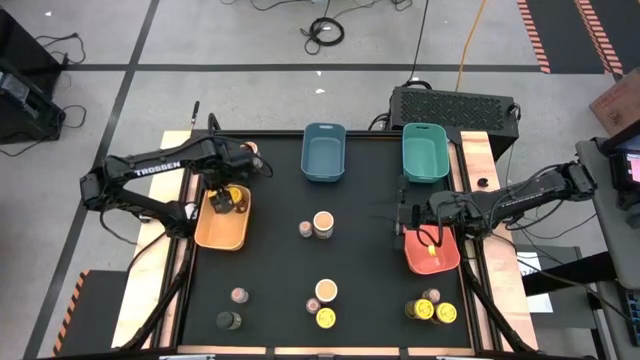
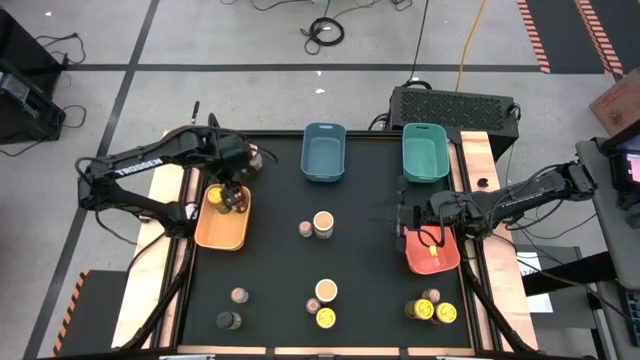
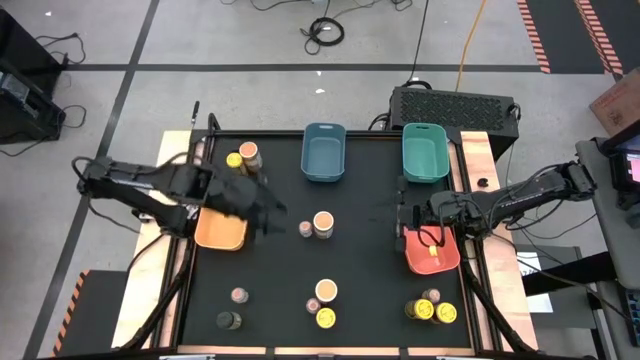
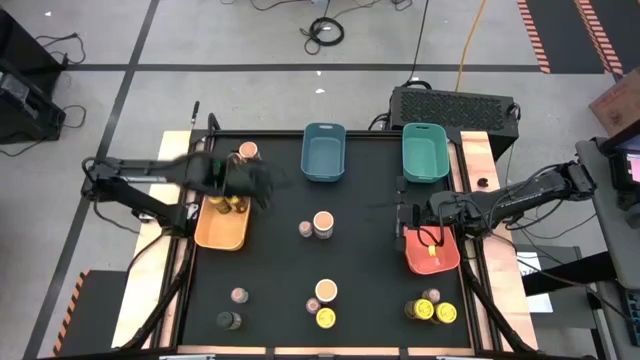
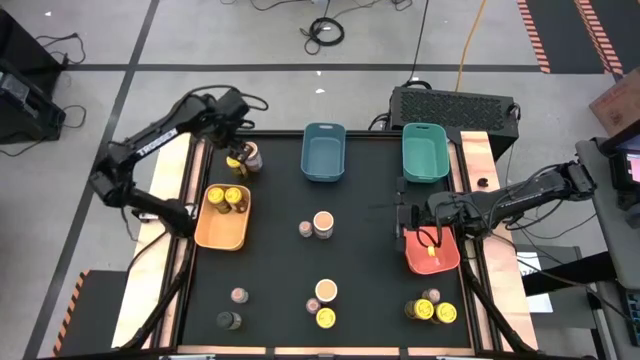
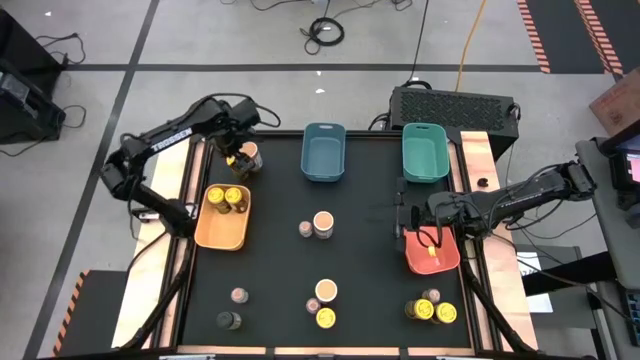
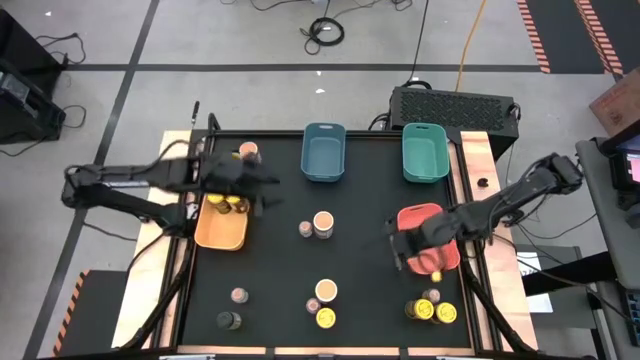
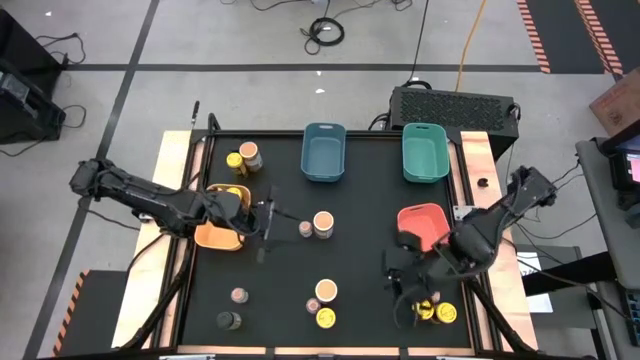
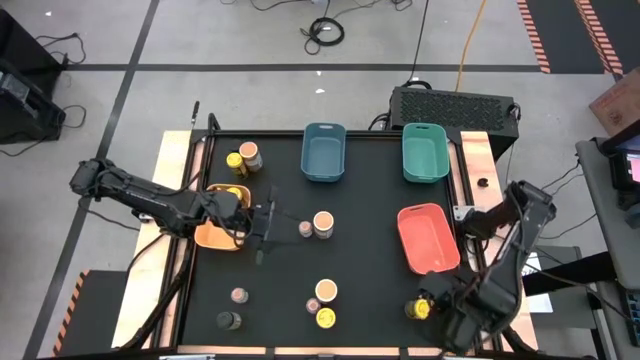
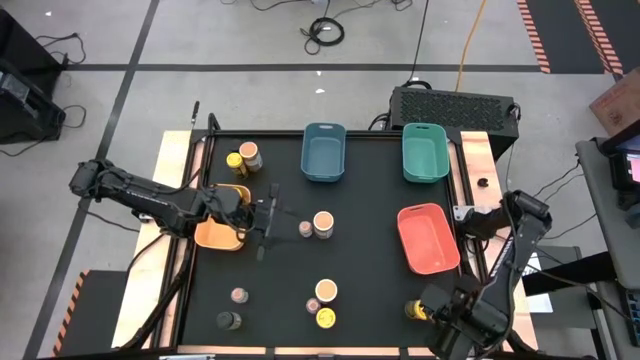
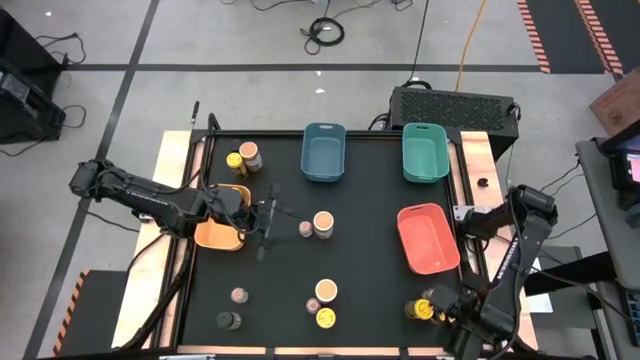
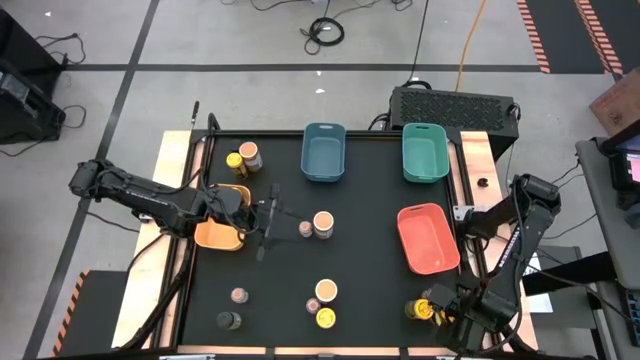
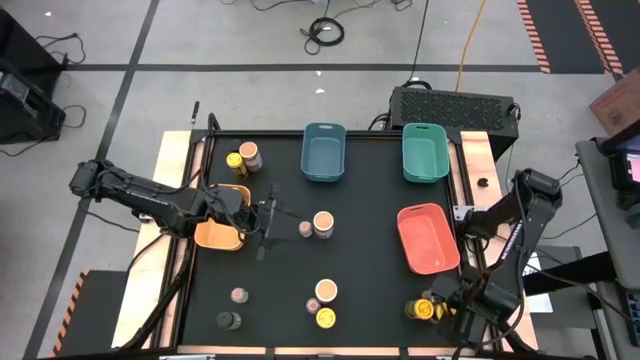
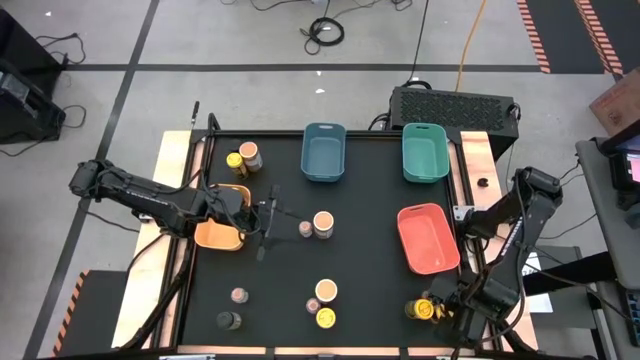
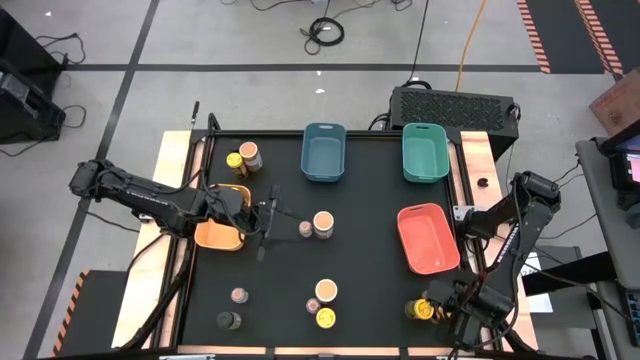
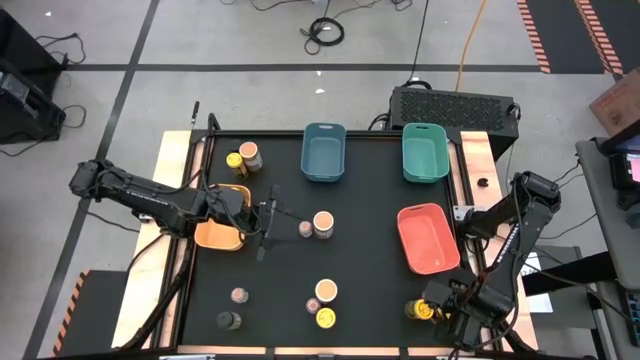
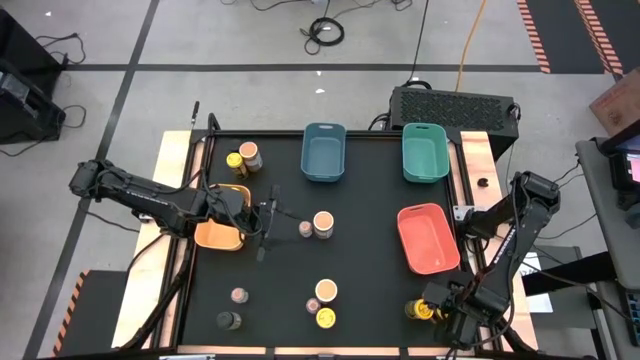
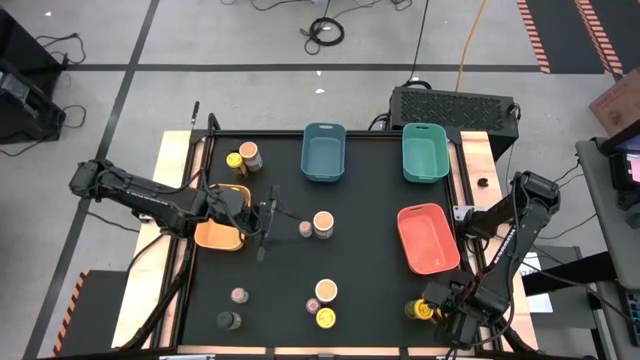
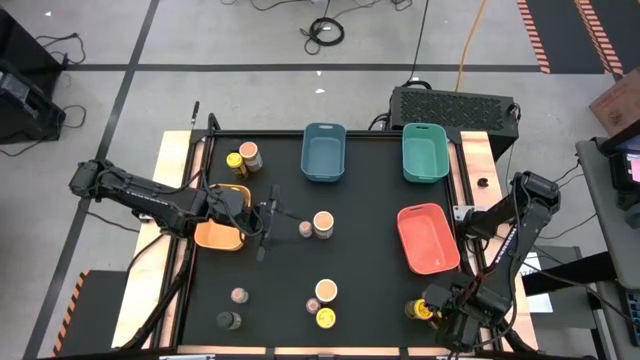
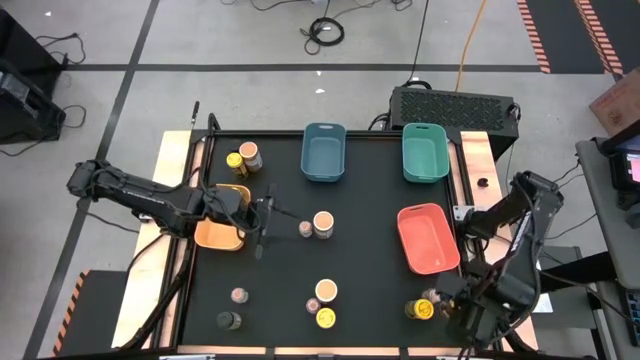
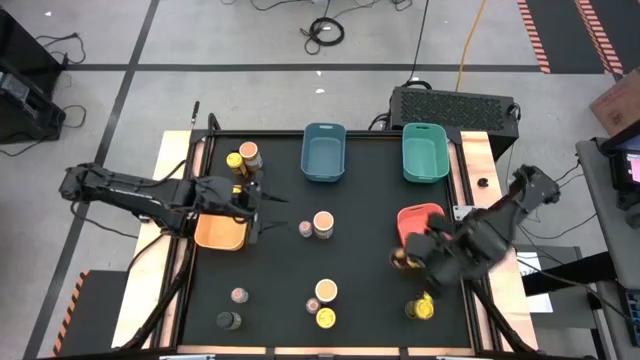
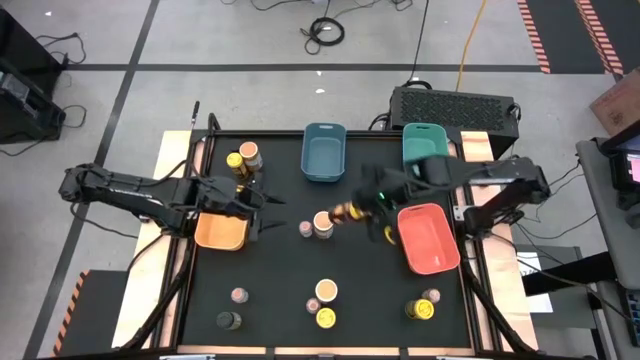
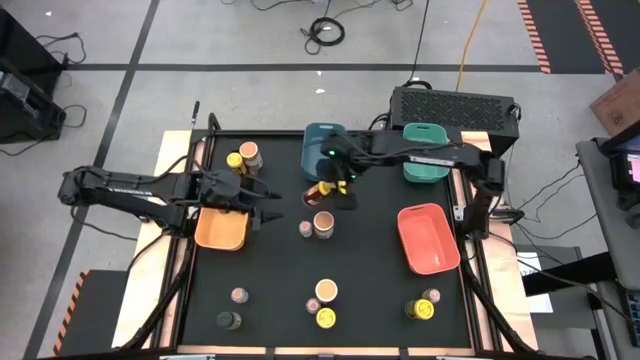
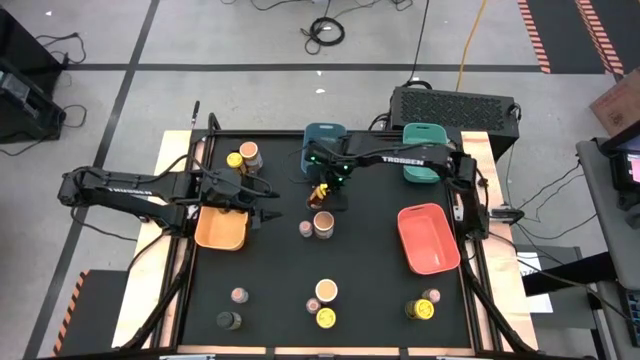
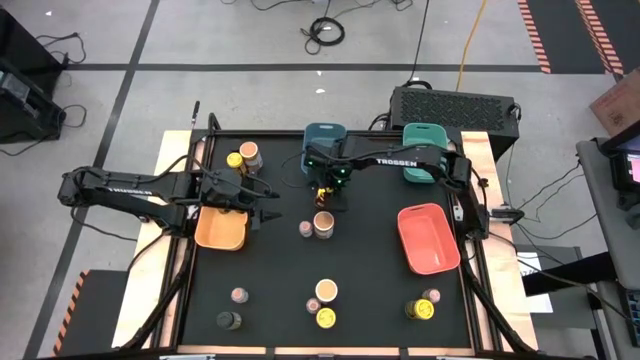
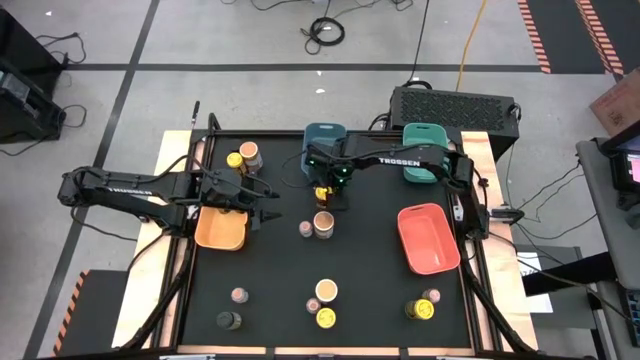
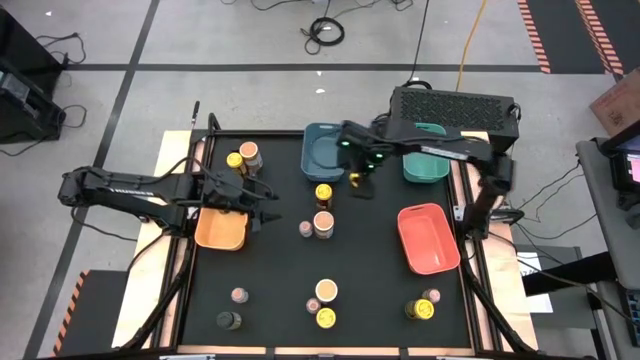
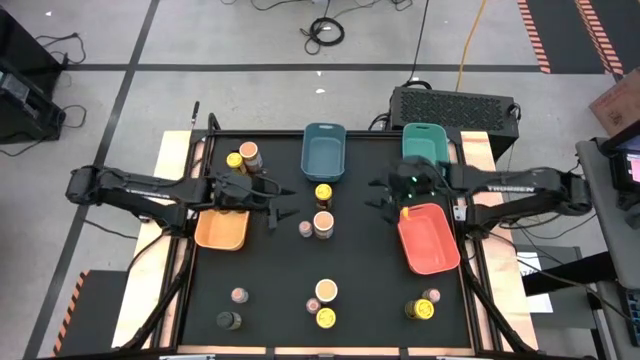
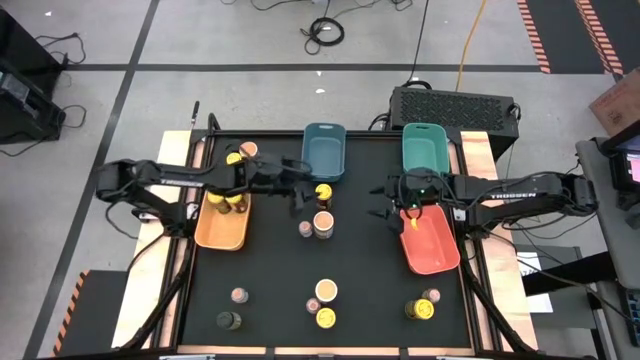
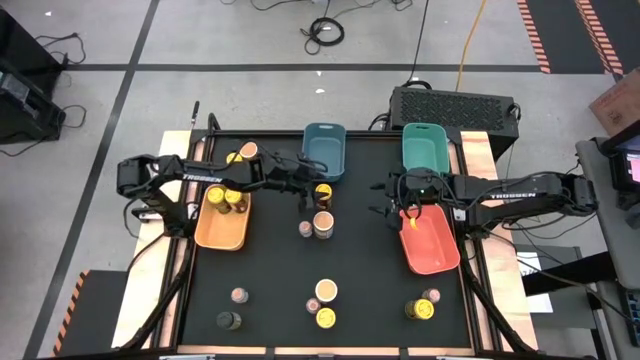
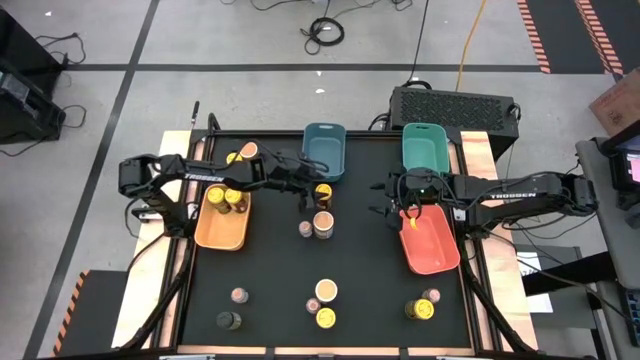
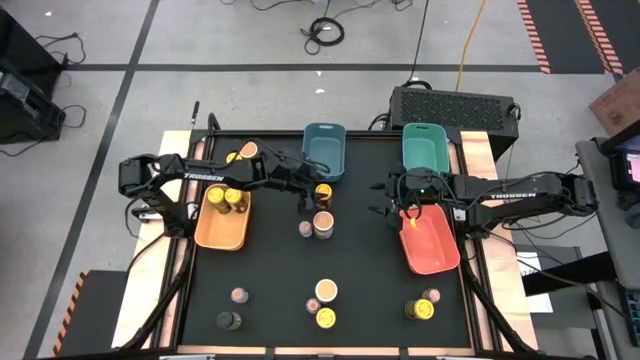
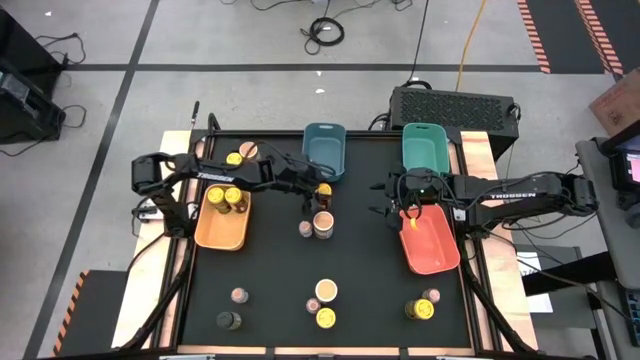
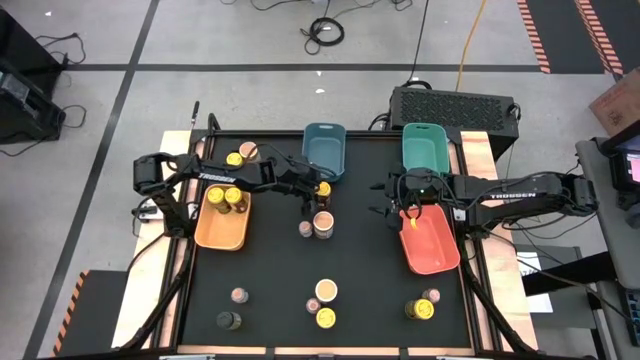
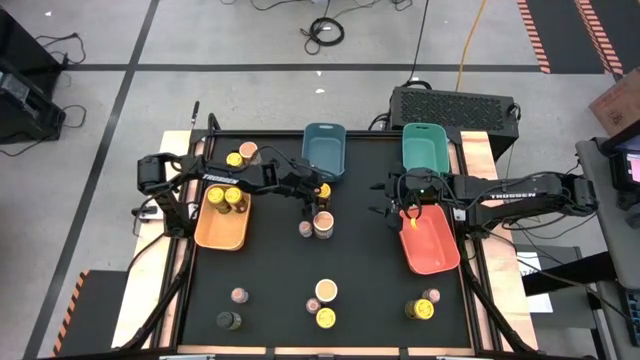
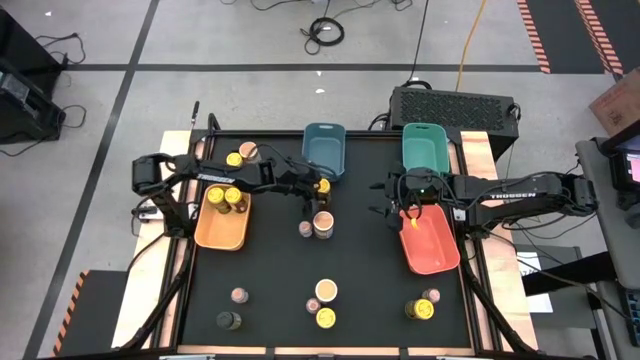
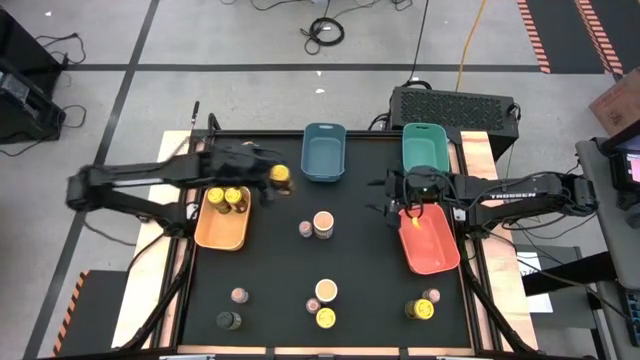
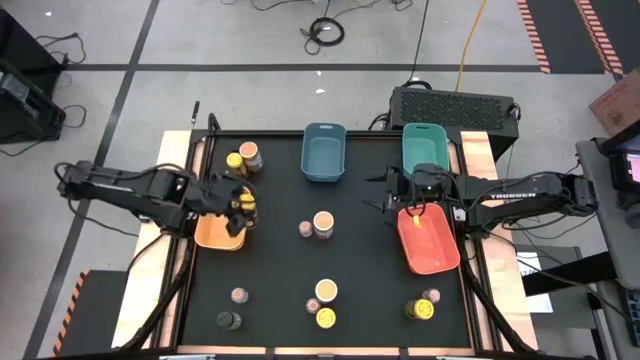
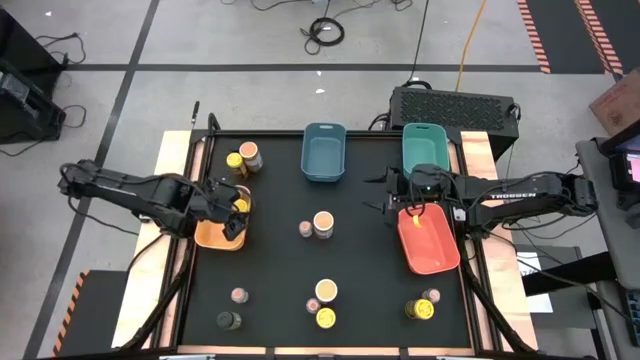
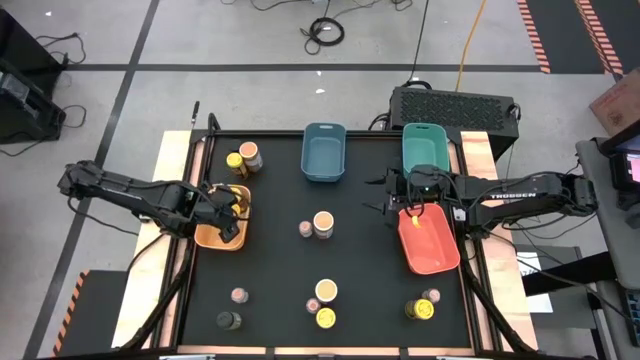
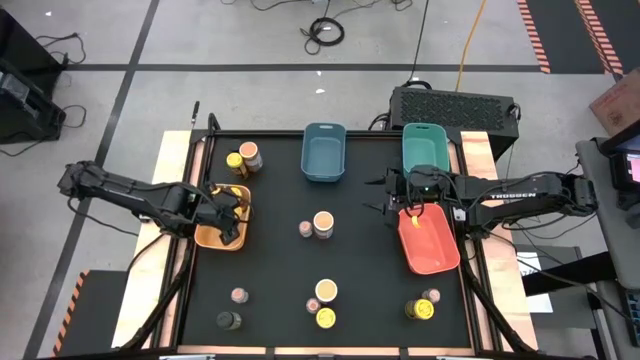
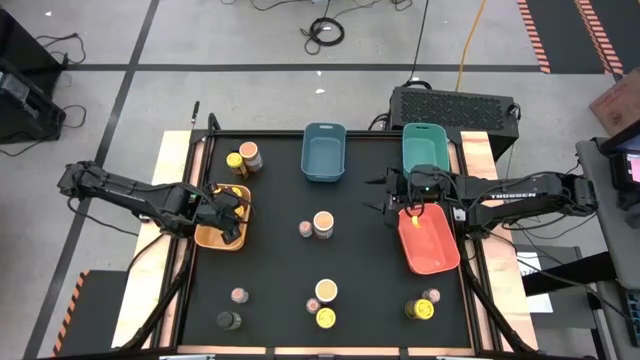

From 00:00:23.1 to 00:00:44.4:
Task: Sort spices by type
Put the yellow seasoning can into the yellow bin
